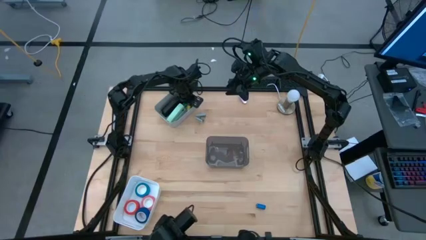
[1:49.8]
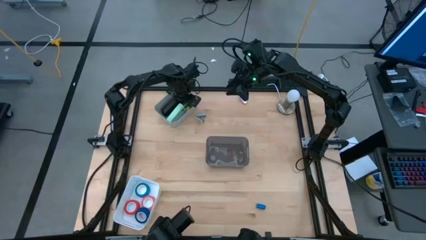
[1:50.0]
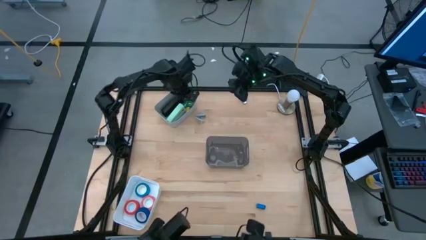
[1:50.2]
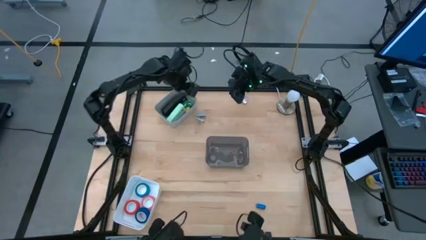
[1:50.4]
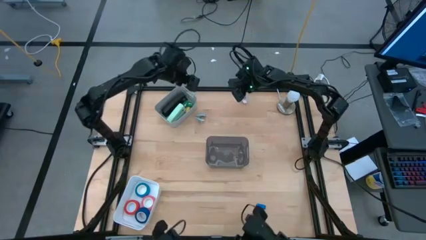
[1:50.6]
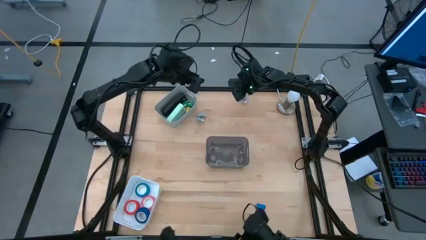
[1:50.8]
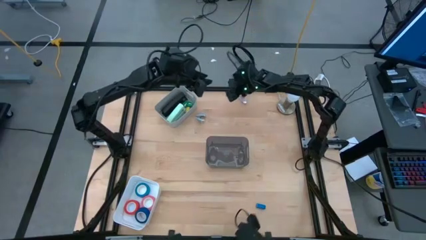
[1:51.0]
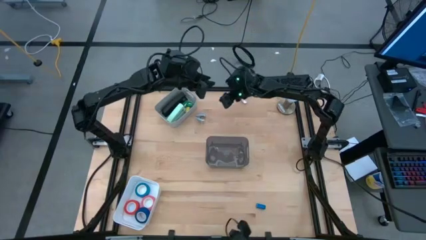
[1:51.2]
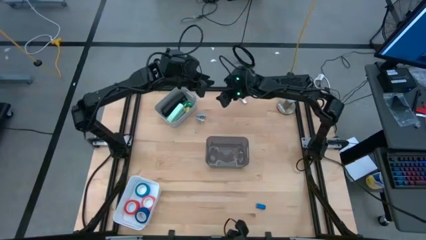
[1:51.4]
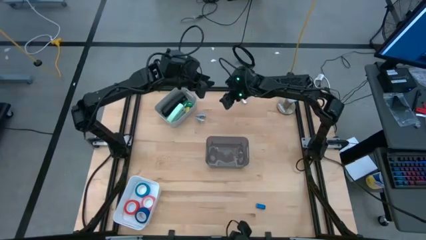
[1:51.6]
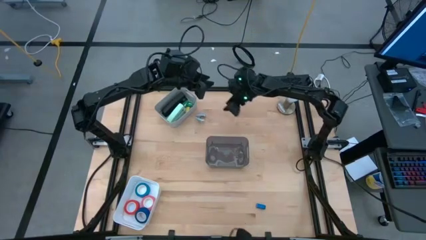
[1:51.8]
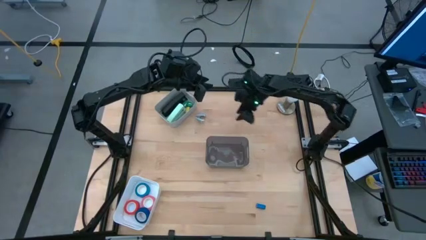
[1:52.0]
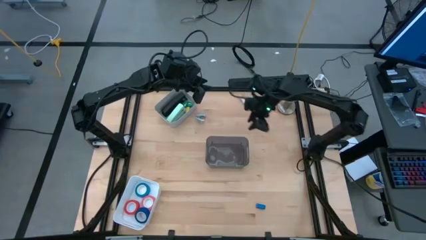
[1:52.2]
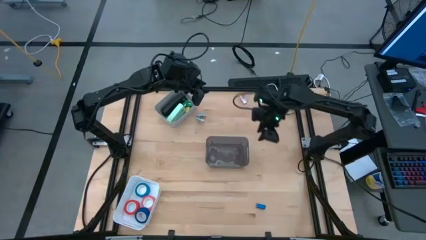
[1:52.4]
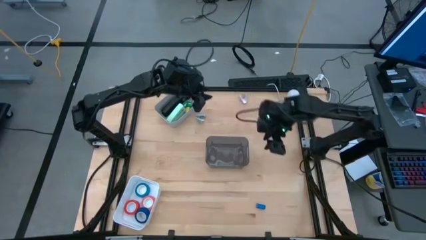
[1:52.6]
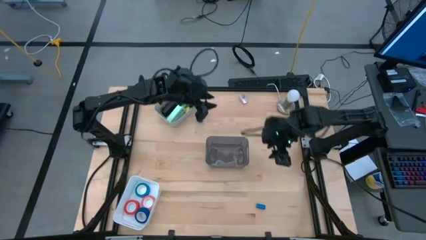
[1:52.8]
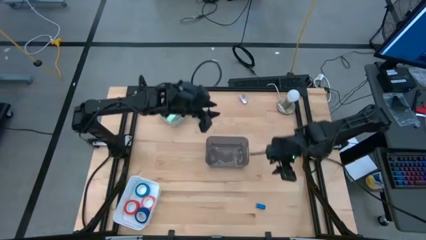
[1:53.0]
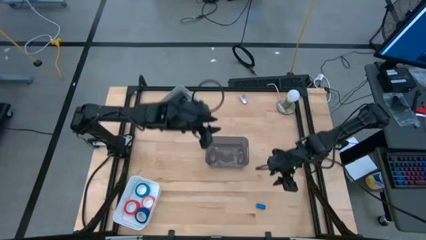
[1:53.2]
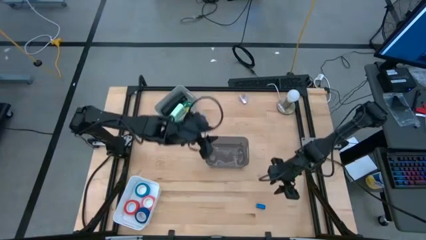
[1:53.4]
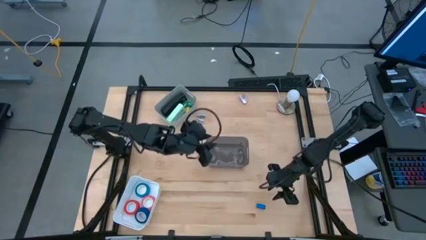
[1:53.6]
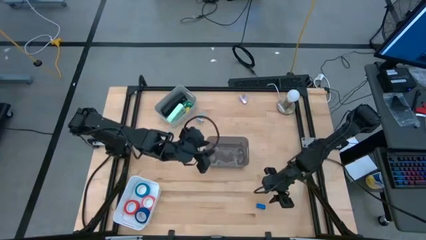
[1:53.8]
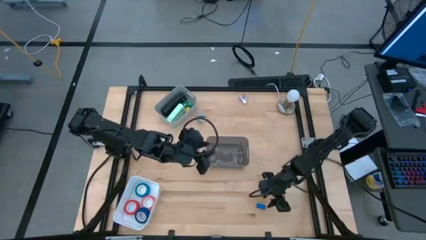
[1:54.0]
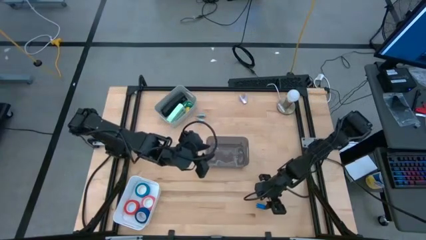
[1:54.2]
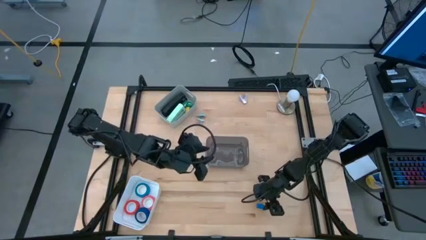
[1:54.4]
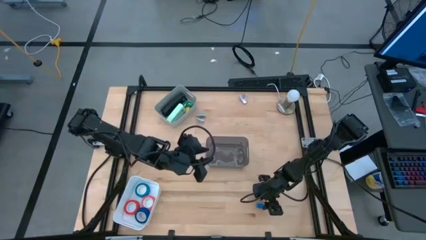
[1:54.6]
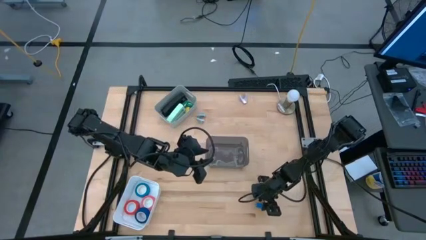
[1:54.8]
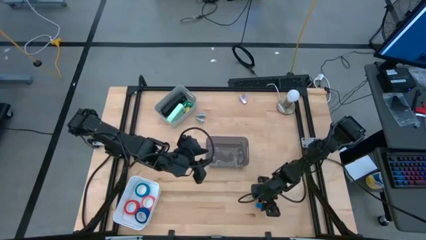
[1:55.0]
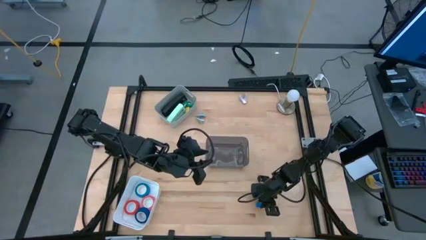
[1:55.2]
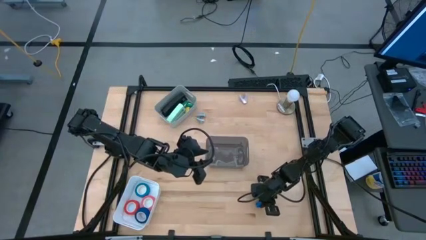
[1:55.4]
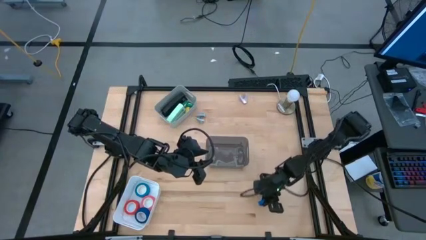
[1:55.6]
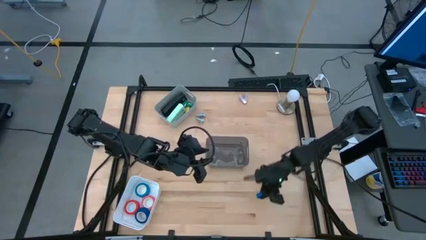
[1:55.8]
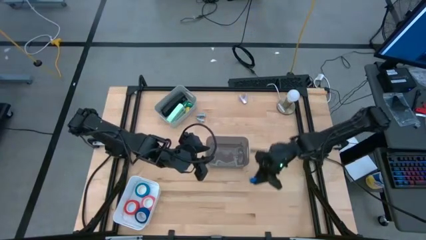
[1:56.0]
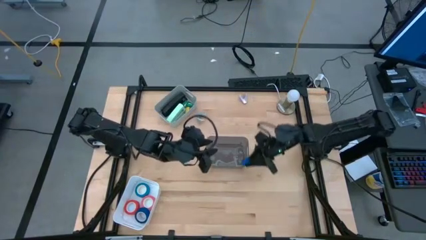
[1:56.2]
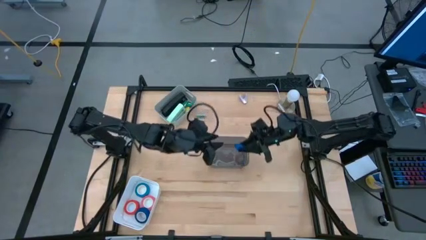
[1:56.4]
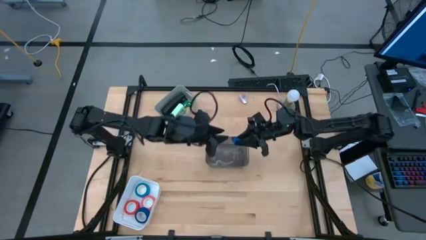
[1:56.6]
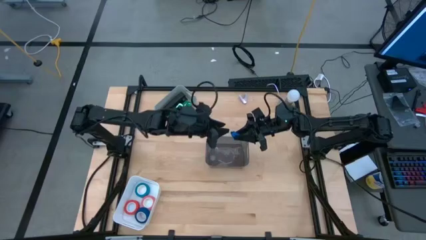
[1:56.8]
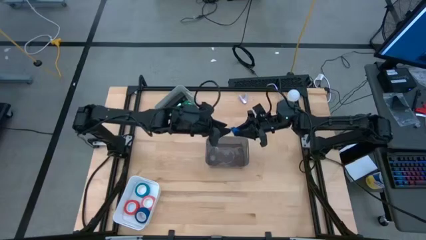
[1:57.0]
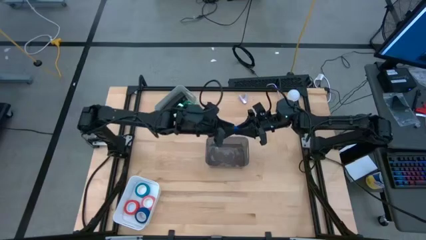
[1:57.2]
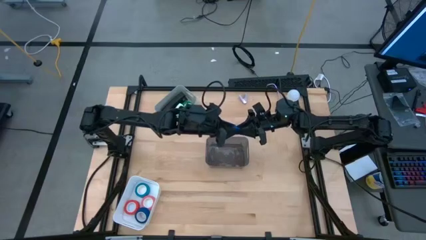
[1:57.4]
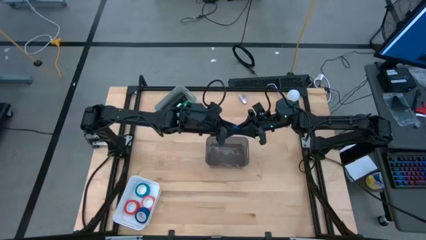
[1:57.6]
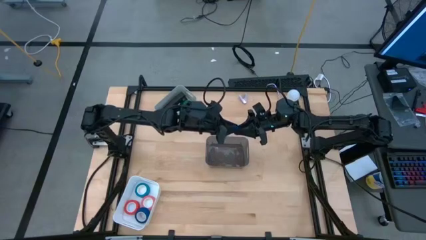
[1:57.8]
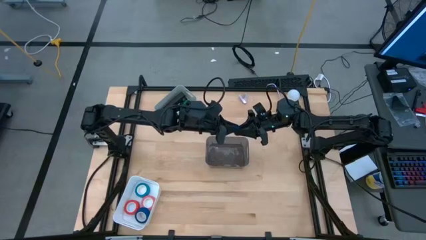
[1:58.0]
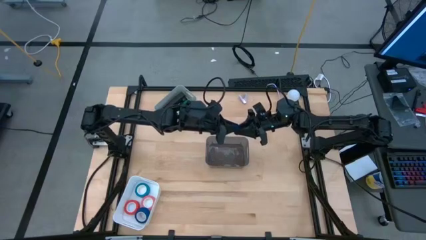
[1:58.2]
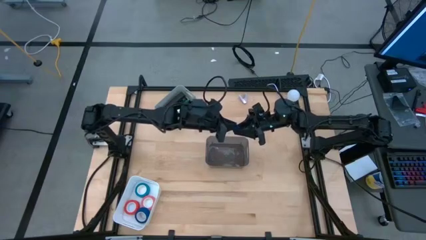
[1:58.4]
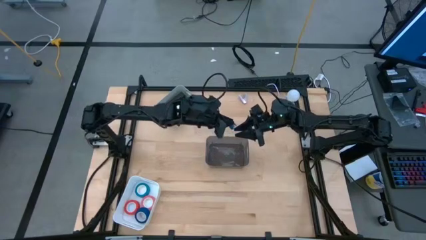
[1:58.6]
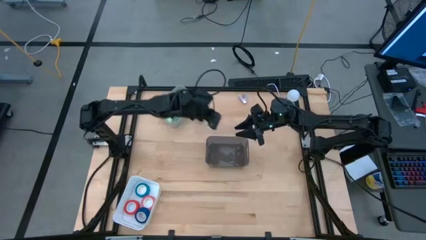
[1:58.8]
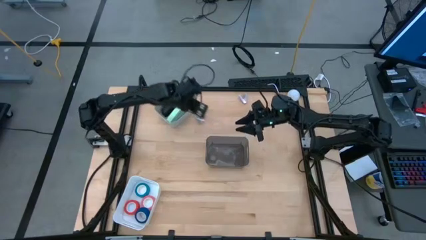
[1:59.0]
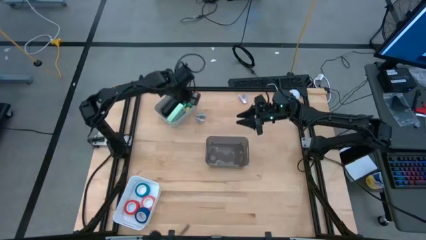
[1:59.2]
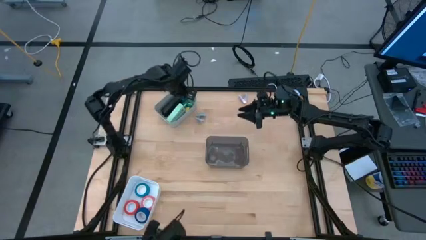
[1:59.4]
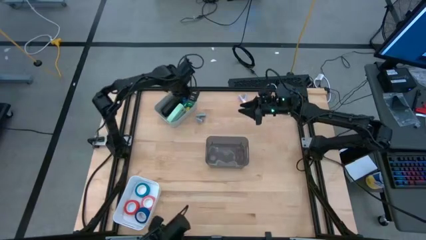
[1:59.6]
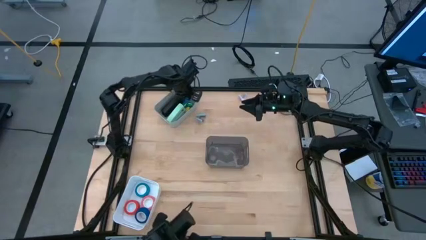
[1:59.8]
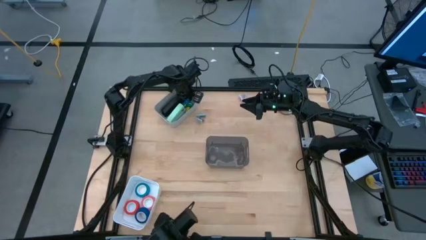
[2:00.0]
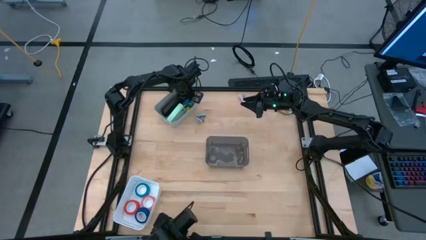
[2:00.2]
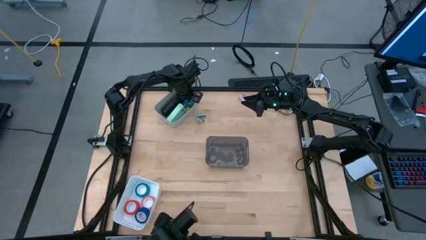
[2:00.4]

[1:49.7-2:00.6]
Task: Pick and place Stapler, Stapler remover, tape
Put the blue stapler into the gray bin

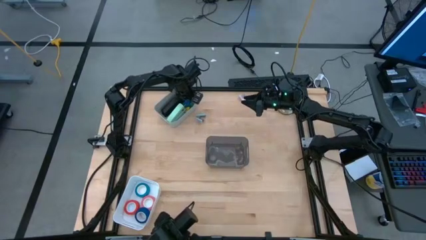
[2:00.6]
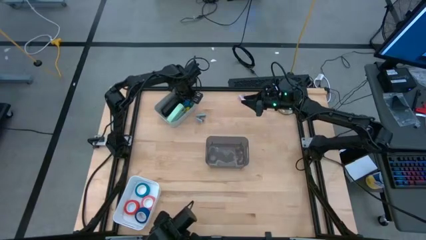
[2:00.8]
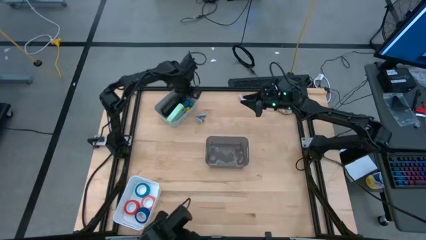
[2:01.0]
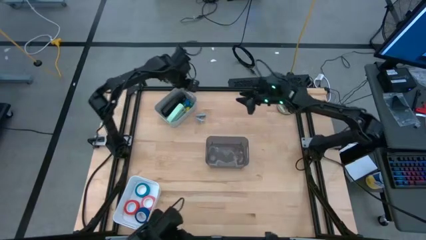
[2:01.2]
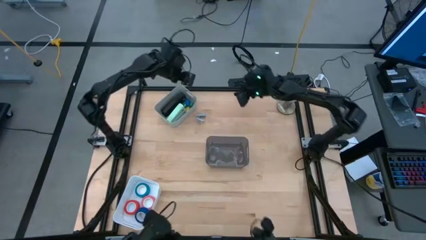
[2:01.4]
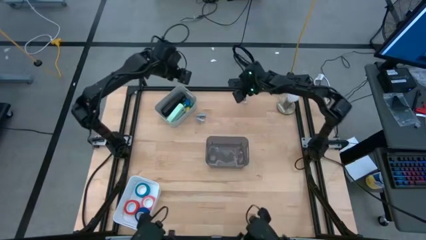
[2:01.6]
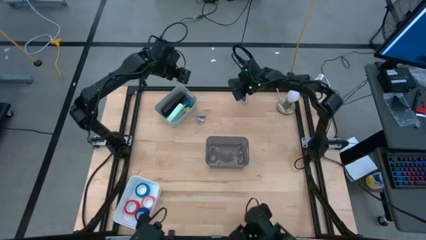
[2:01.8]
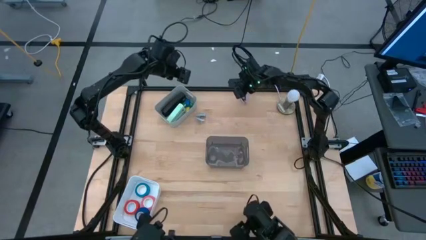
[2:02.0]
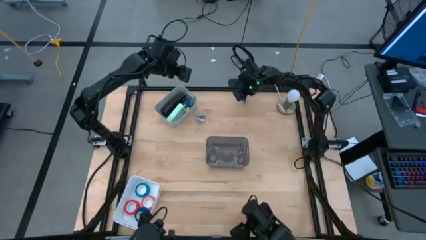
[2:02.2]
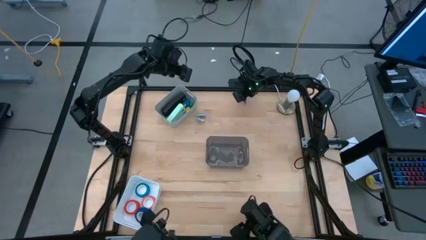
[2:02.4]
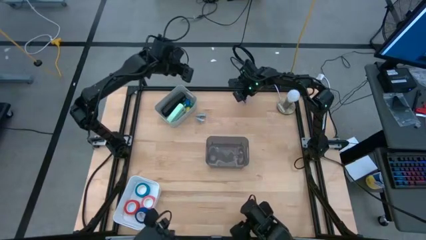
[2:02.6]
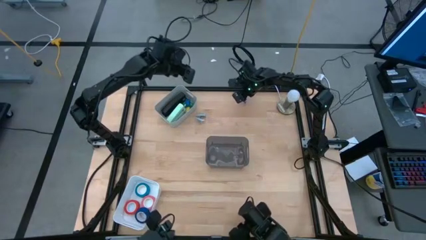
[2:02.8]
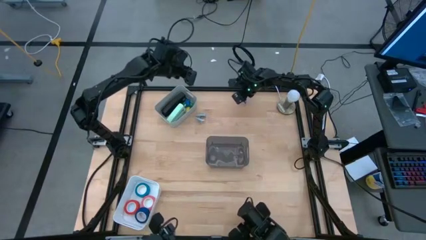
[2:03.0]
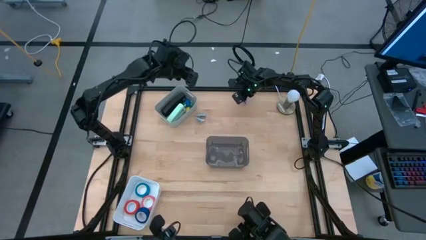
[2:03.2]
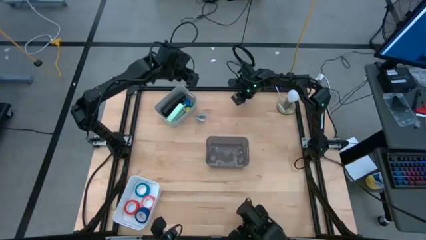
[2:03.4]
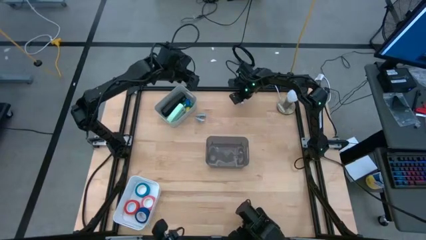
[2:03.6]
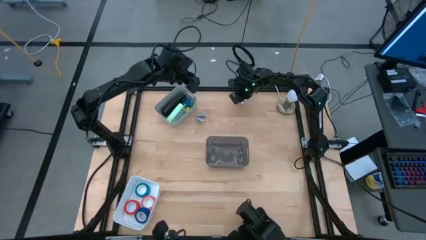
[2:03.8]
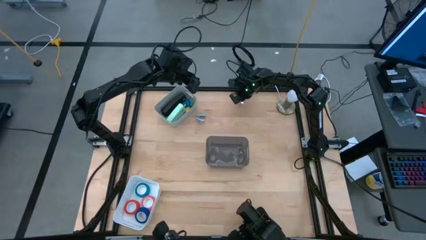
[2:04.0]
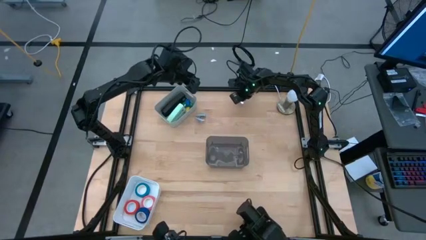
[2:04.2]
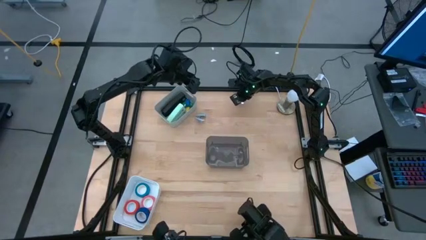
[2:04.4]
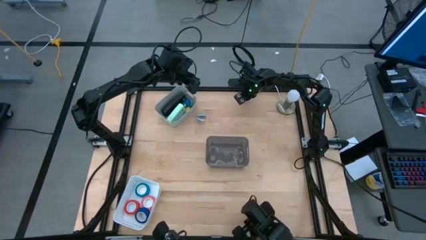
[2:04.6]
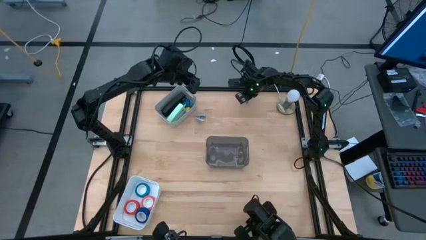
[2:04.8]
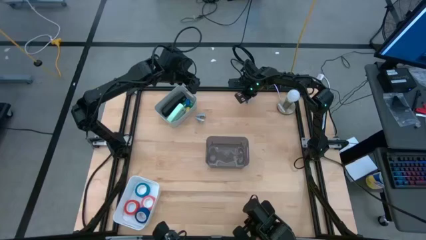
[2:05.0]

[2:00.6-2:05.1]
Put the purple staple remover into the black bin

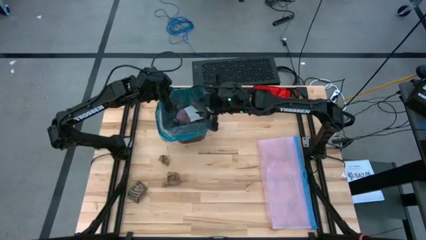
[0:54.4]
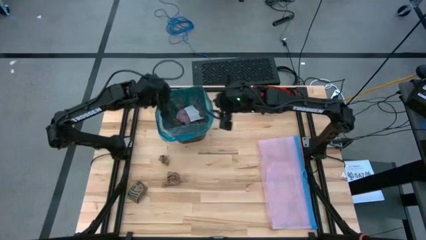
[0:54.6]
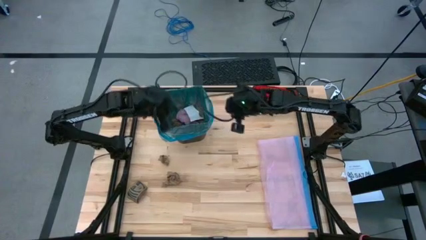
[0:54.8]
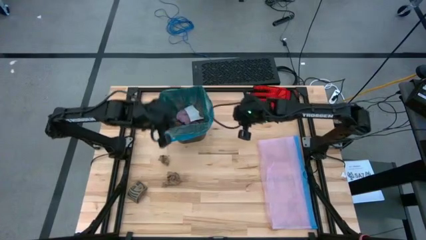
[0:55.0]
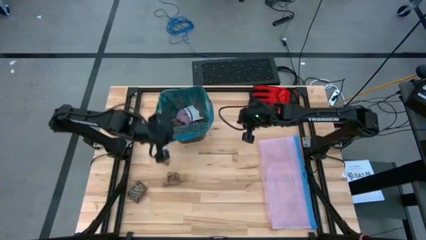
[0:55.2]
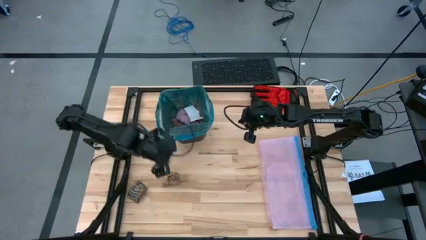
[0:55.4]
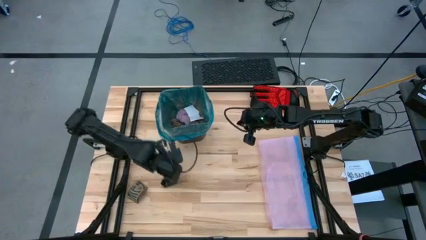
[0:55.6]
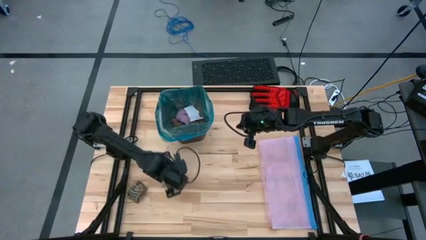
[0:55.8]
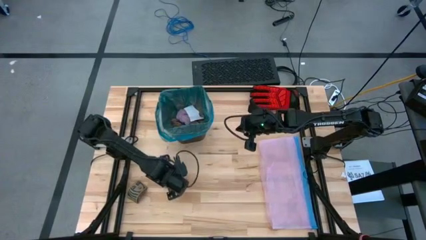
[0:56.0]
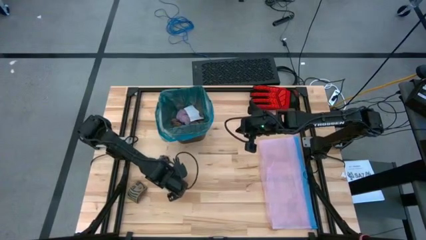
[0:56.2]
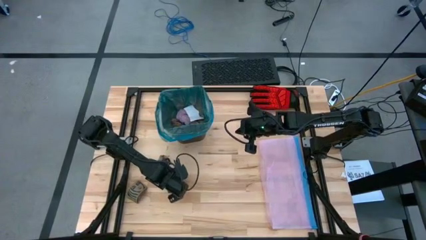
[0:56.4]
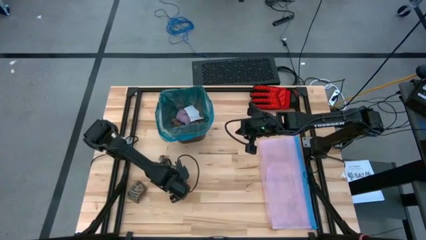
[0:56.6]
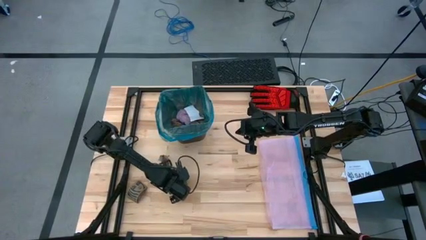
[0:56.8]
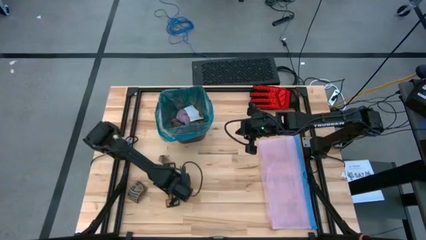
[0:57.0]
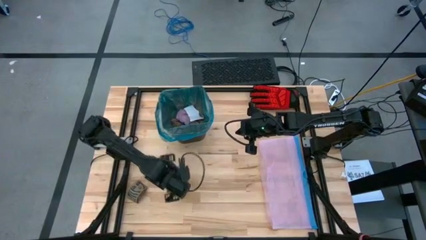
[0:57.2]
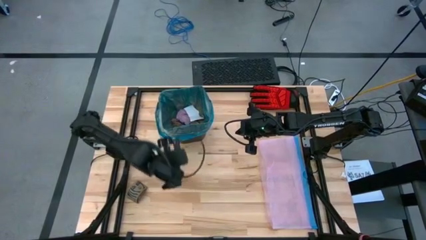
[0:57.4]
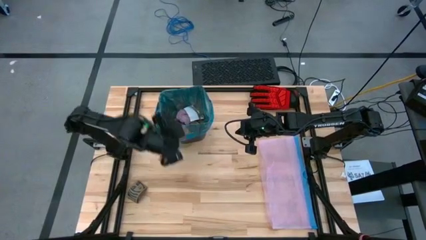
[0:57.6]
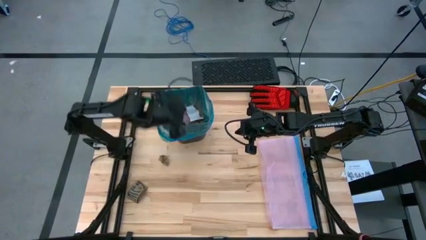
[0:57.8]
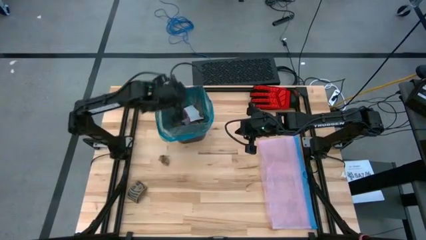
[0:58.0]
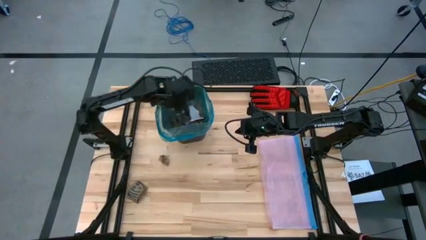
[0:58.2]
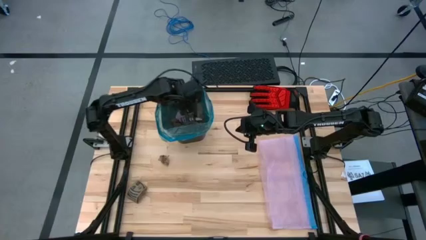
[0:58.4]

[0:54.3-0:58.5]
Task: place trash/remove bag and relplace
Put the brown napkin into the black trash bin
